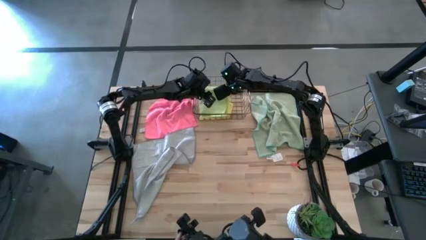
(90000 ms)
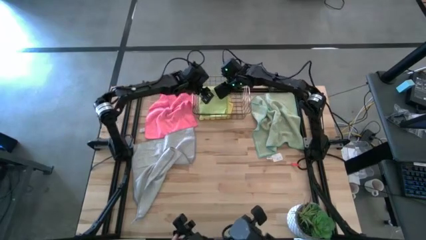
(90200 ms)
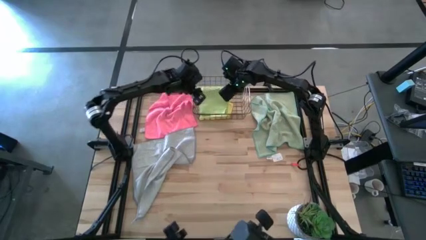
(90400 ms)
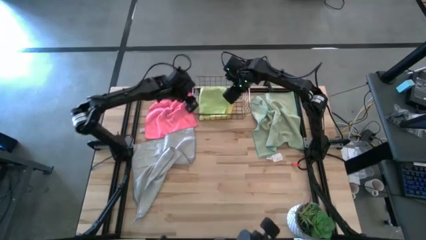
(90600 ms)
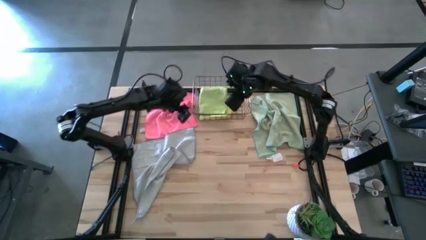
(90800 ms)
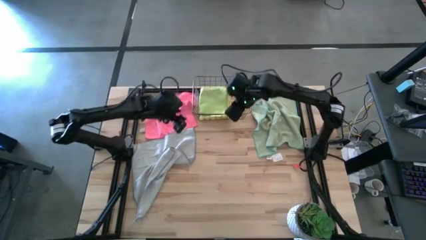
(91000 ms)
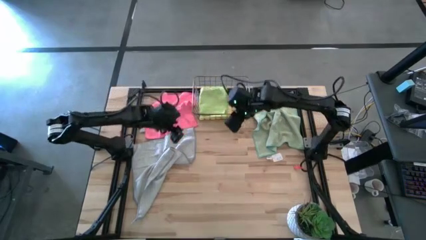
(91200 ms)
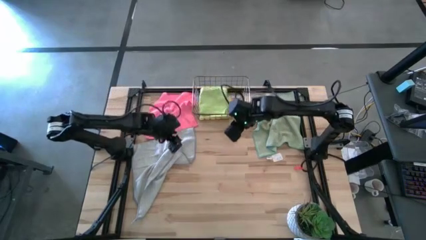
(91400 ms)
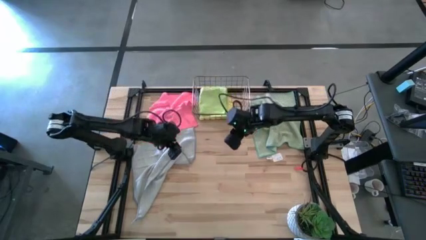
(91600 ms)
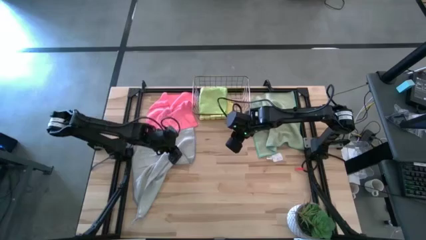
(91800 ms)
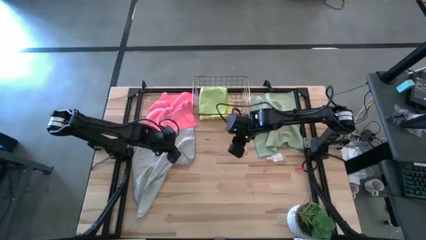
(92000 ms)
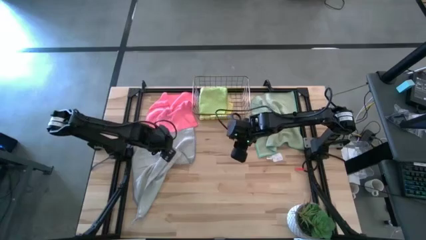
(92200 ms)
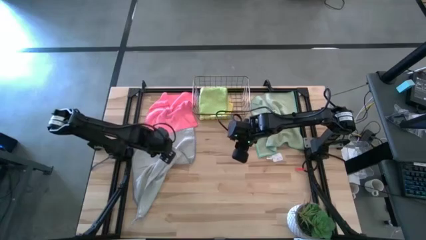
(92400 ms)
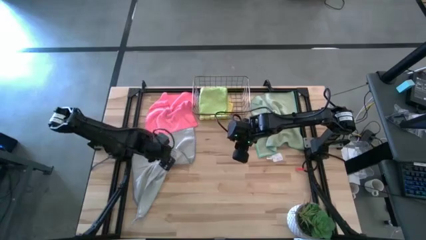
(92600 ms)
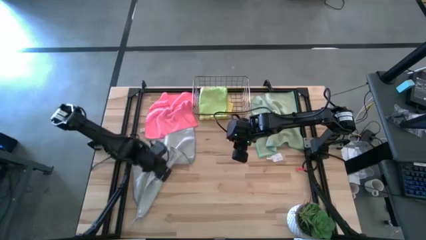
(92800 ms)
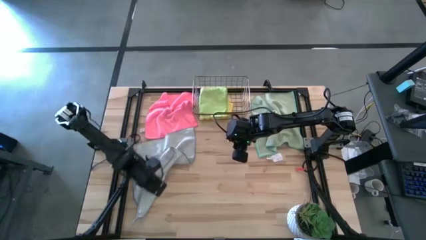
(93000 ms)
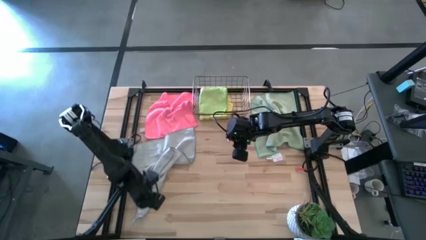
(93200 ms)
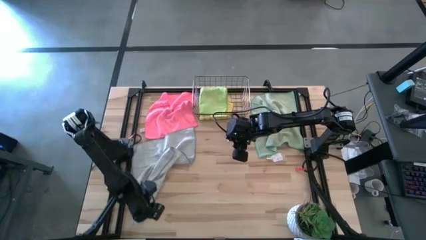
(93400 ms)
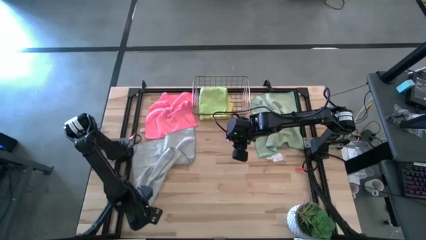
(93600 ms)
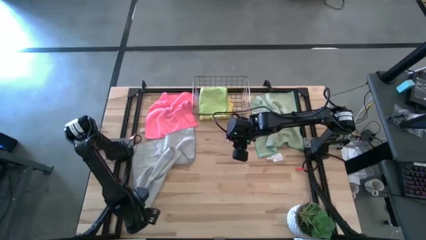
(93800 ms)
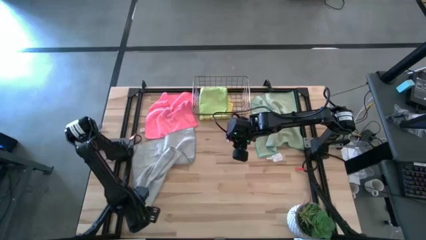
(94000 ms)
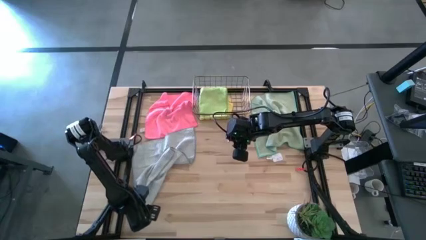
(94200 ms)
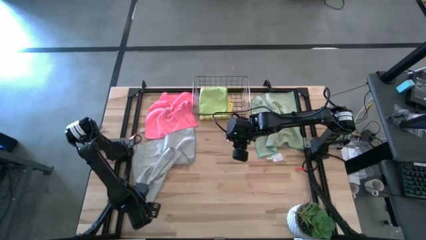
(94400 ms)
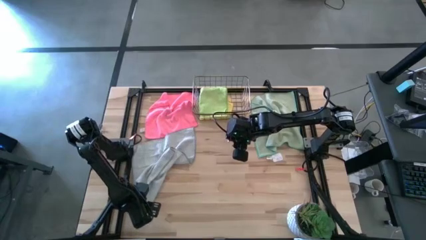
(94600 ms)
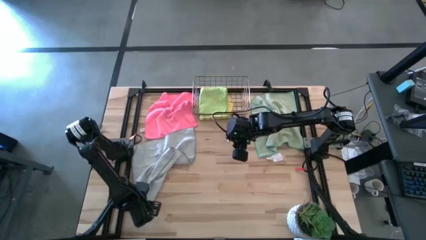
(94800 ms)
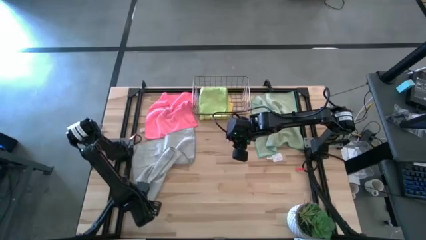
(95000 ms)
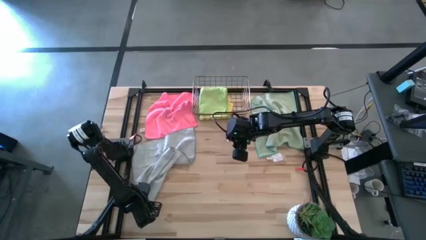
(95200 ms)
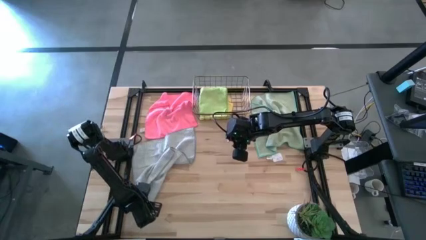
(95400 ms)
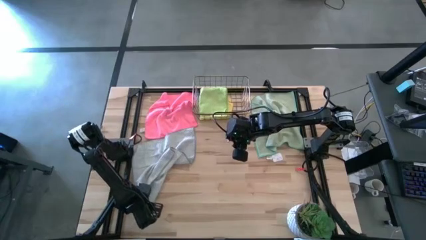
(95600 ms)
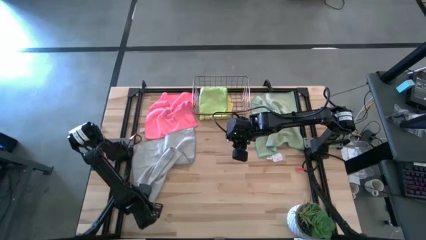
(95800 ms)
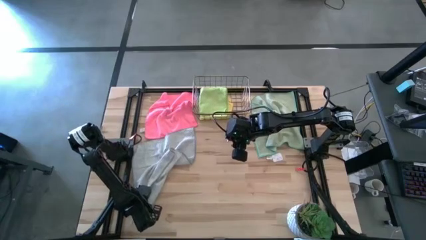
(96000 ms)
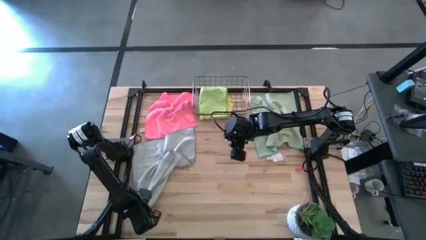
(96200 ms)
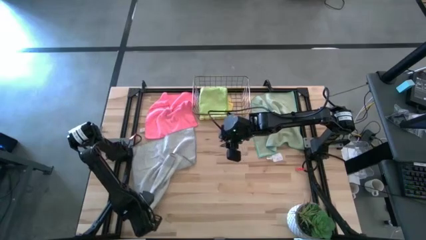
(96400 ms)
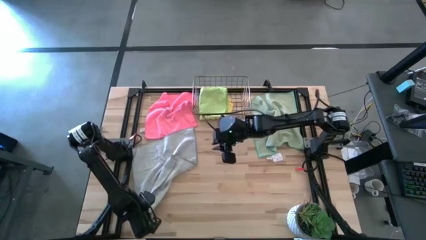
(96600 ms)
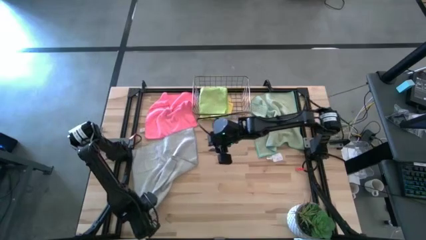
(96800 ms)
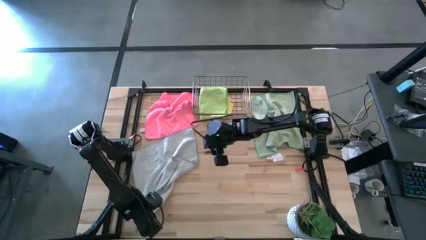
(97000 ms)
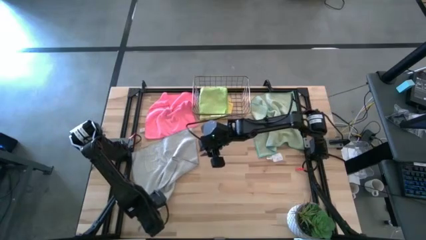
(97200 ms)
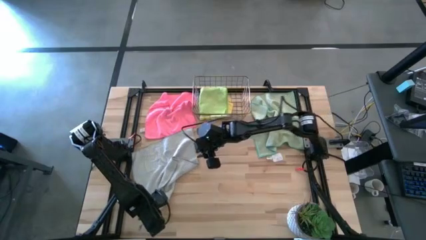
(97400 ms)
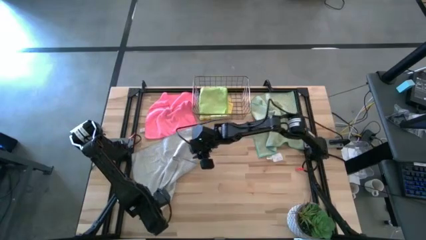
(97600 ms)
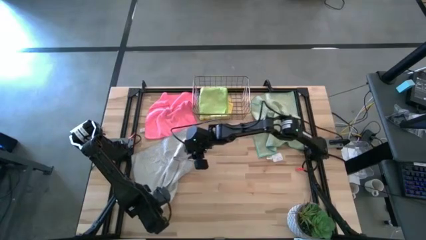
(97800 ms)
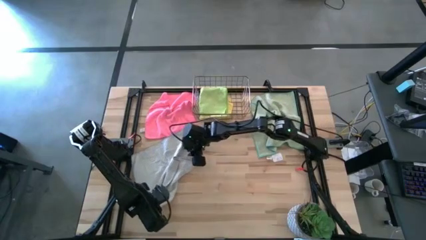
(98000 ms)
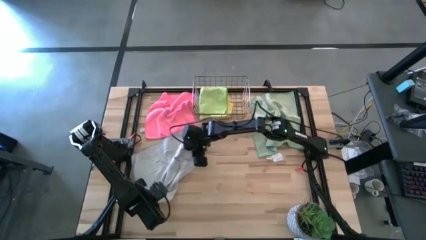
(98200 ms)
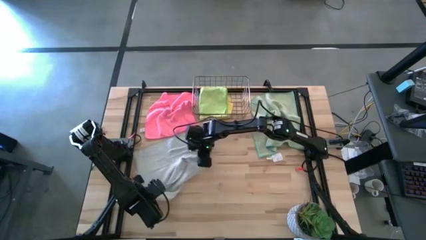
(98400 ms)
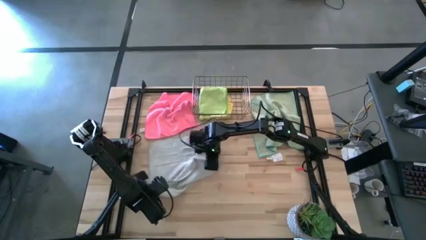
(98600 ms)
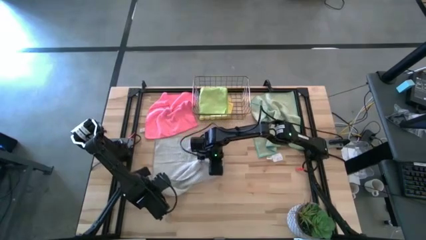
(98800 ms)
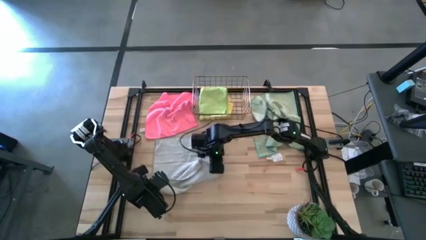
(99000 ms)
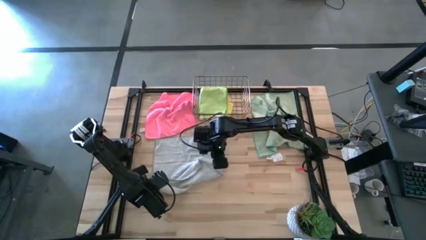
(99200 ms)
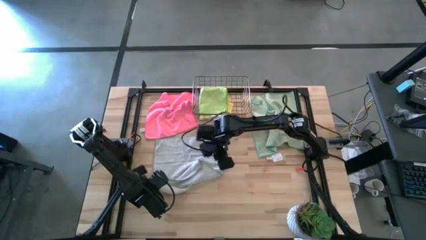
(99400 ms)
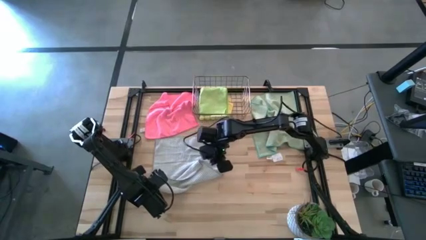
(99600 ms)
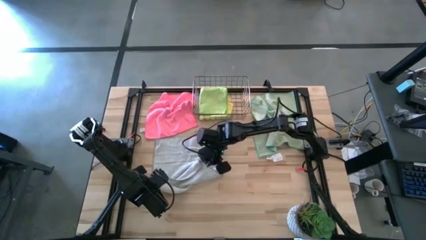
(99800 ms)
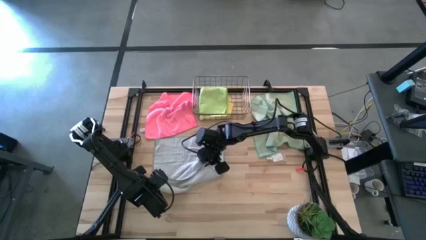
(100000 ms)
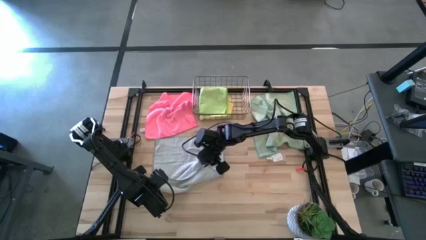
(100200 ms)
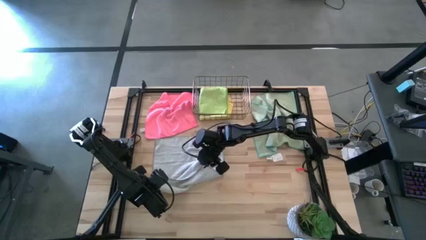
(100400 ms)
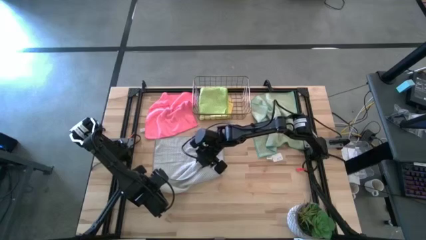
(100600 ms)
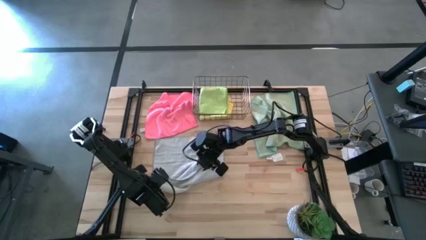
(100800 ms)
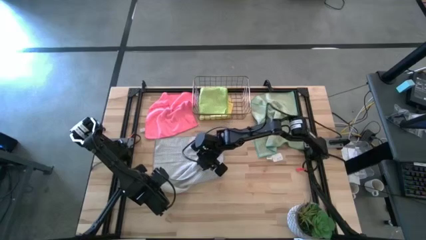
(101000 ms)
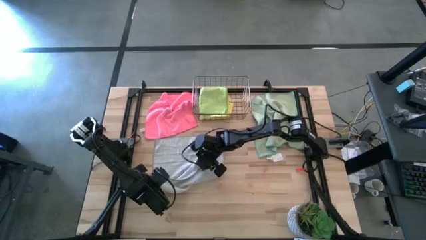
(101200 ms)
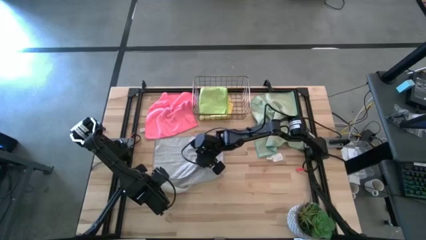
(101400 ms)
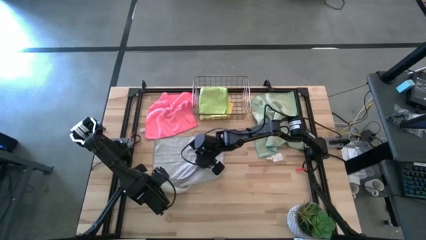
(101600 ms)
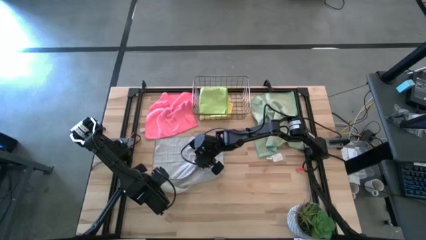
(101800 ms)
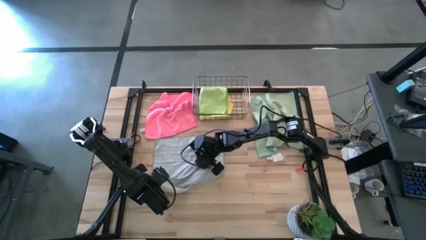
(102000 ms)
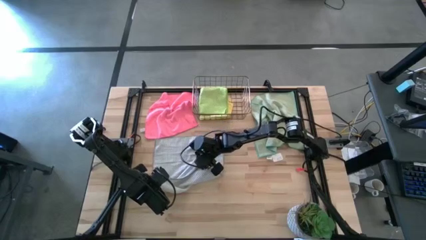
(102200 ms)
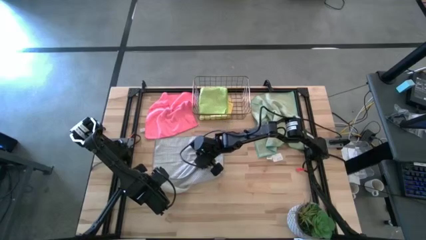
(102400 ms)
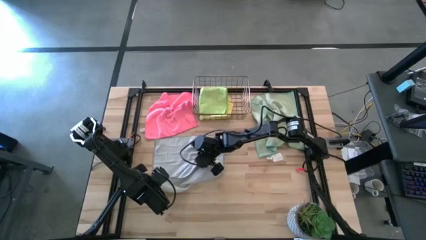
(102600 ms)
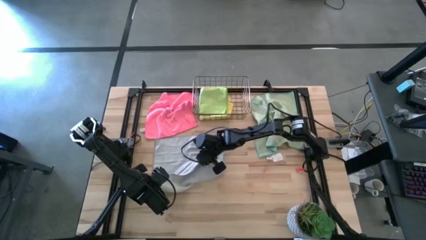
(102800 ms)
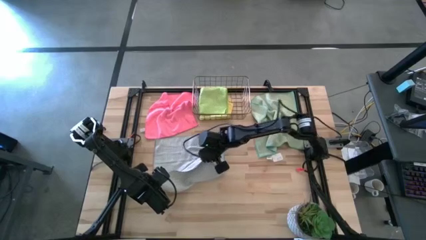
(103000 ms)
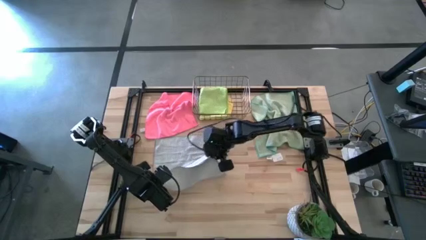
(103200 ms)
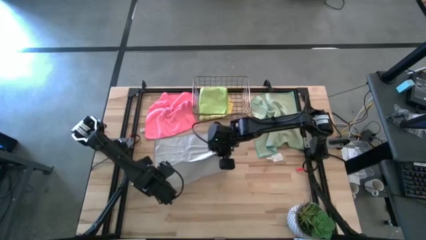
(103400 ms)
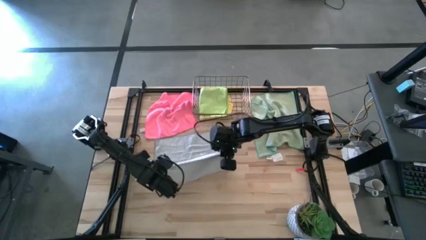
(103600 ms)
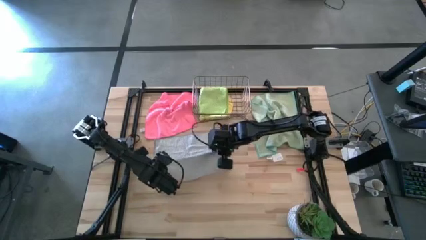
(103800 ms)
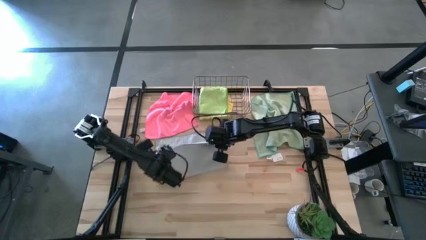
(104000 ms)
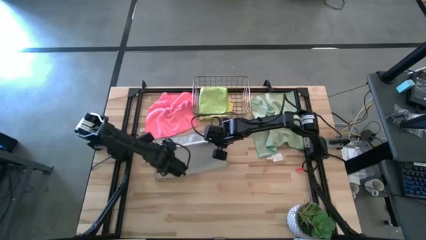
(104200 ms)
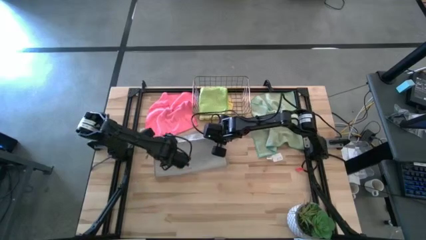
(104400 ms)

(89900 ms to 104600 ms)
Task: Fold microfiber towels
Fold the gray towel
